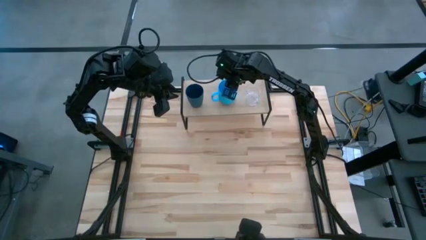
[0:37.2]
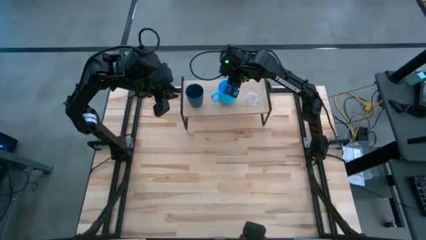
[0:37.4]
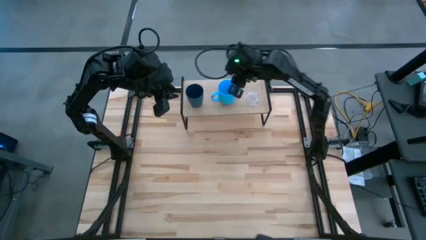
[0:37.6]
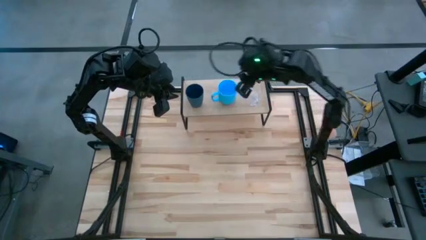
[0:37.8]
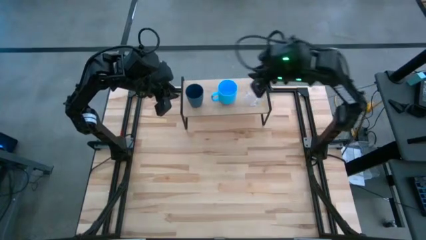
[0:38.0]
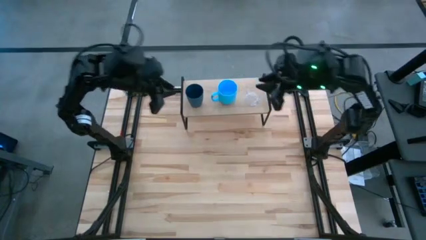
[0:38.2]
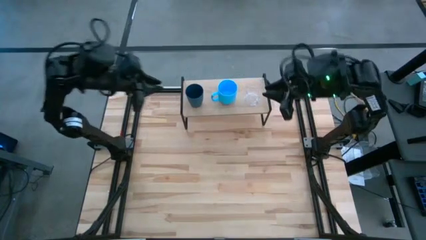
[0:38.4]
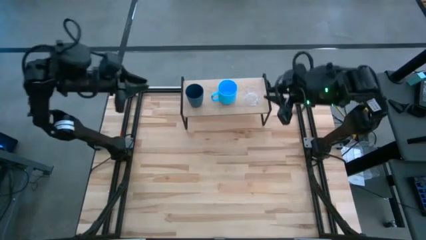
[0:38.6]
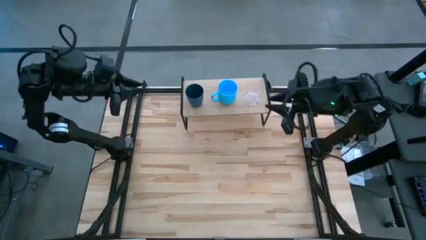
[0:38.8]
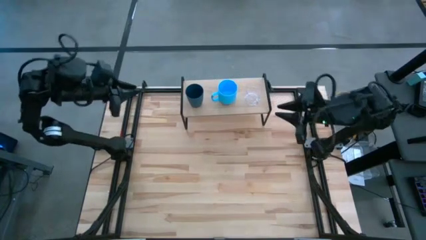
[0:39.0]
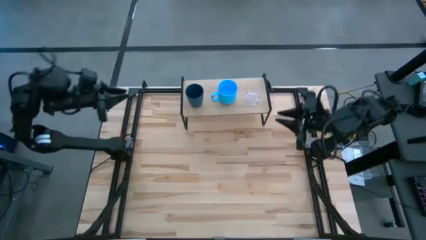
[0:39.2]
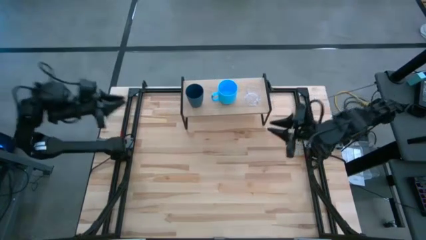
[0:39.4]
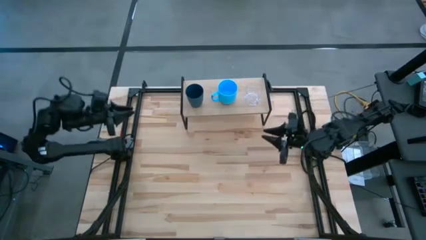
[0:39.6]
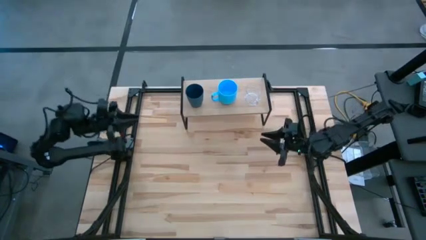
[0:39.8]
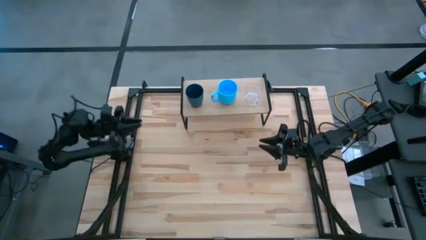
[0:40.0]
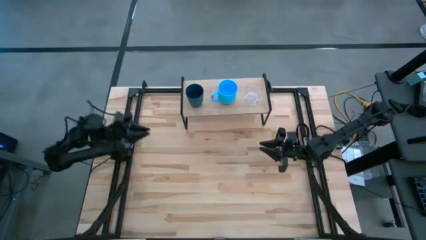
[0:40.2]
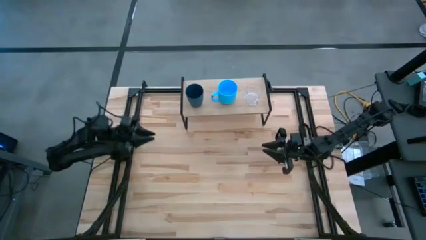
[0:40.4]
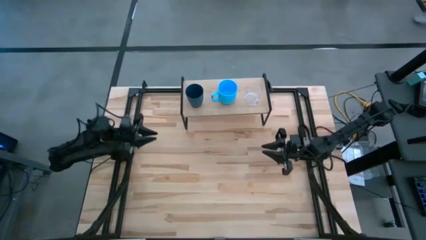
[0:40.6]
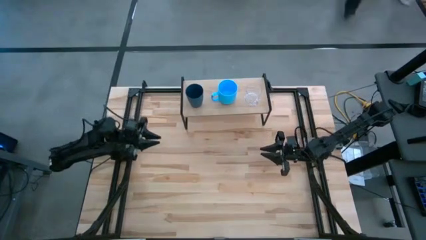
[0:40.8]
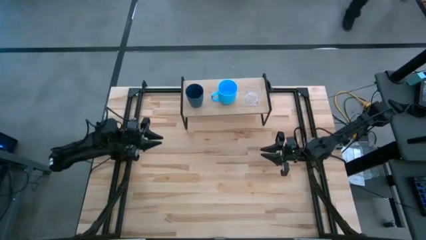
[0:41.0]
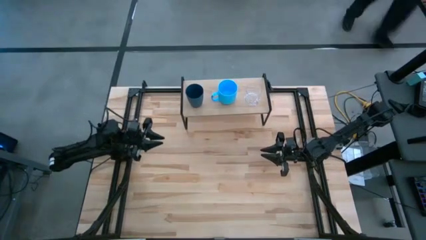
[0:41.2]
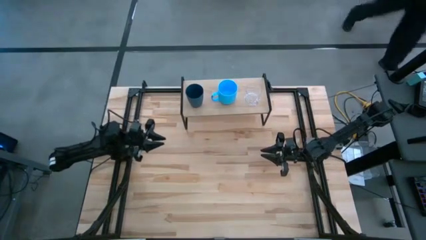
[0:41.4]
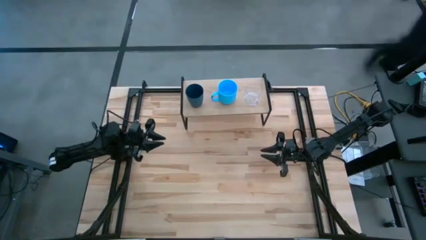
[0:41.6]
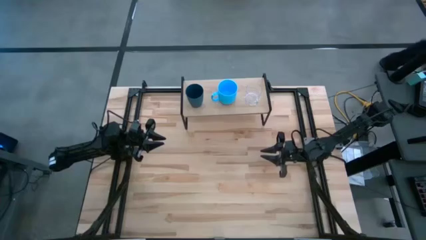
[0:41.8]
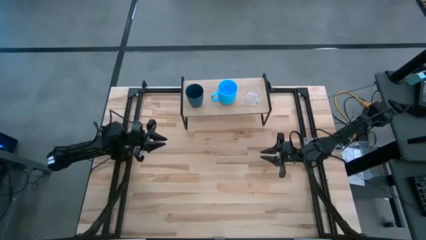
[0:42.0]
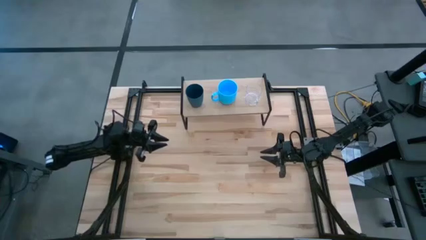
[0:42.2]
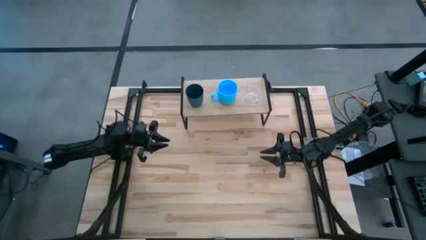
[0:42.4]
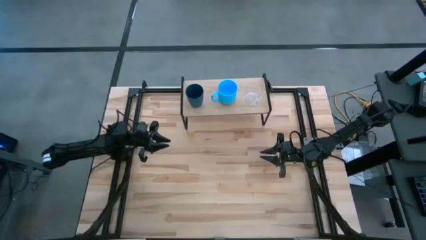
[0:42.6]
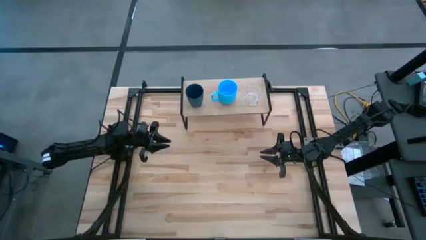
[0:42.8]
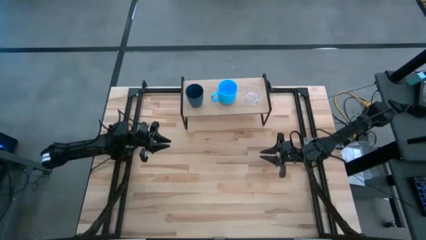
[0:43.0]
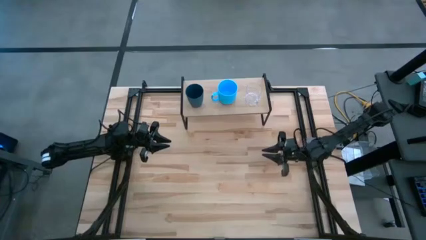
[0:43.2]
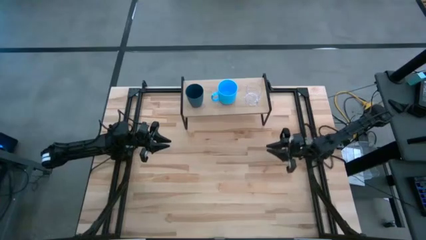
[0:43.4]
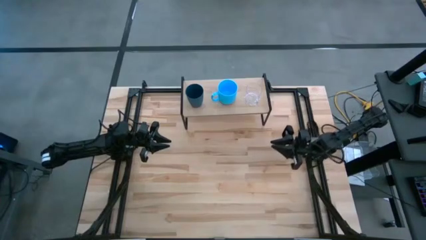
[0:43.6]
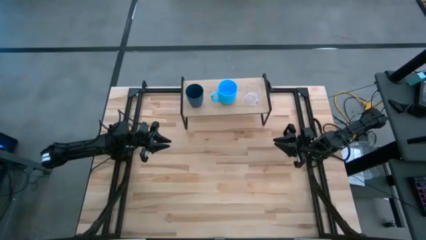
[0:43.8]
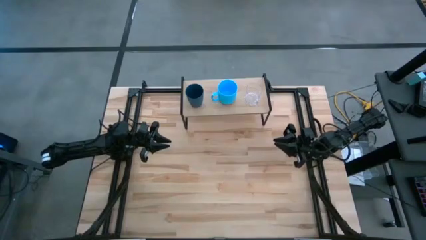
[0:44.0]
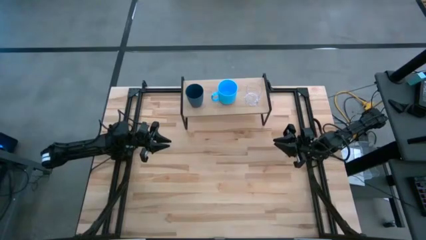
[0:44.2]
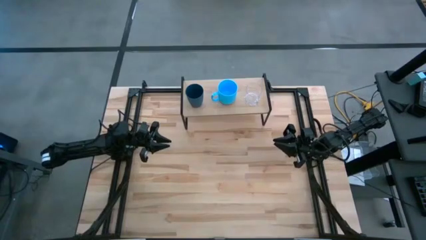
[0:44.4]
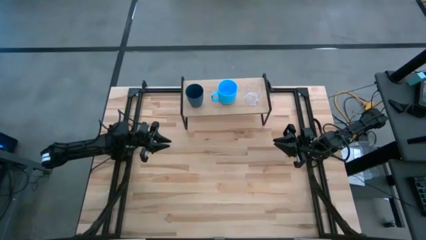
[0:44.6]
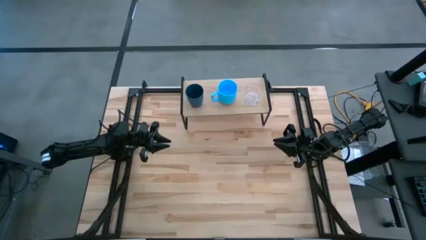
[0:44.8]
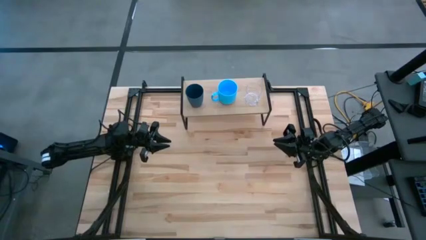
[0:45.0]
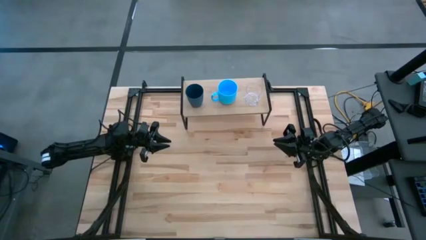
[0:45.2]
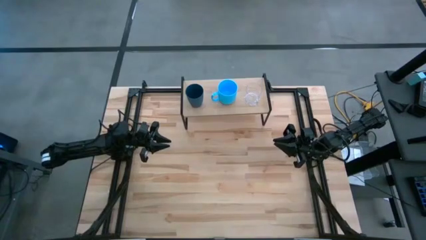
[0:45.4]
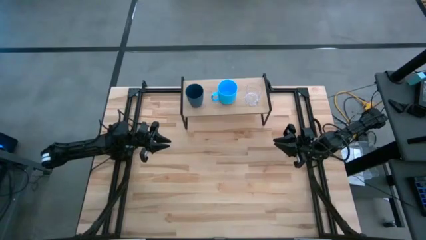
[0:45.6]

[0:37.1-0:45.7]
Task: Stack small to large cups/mugs on shelf
Return to Home Position
